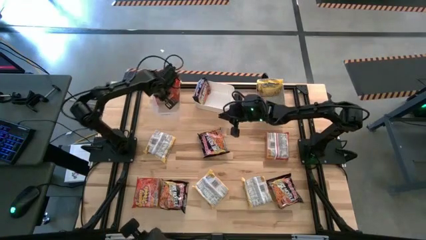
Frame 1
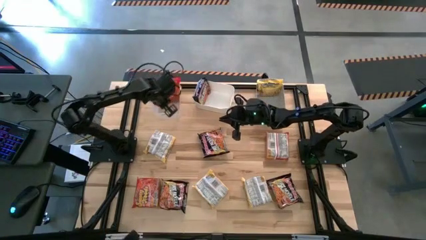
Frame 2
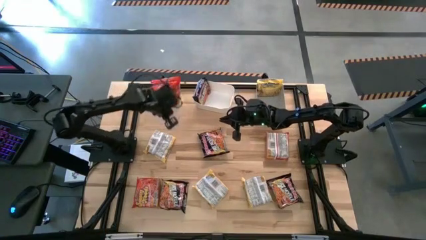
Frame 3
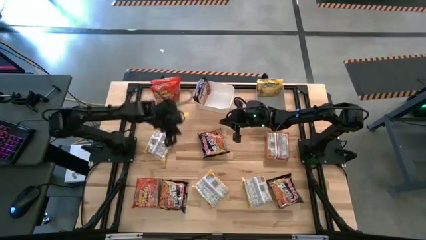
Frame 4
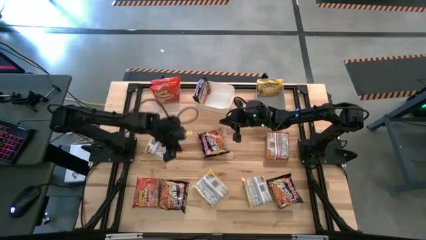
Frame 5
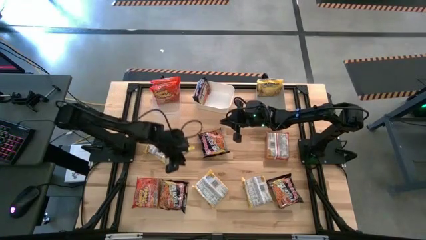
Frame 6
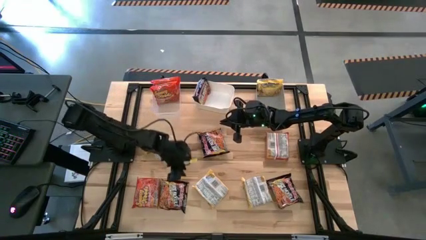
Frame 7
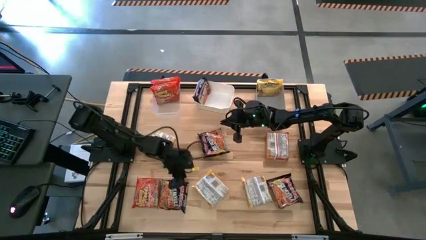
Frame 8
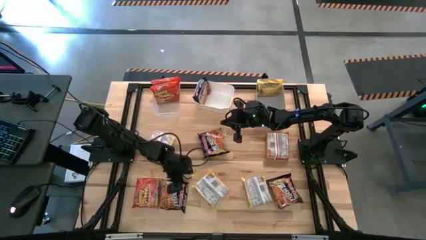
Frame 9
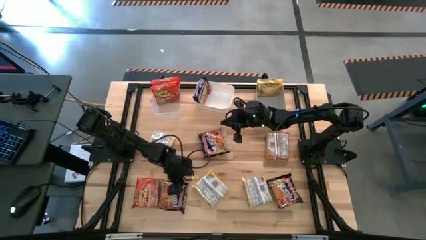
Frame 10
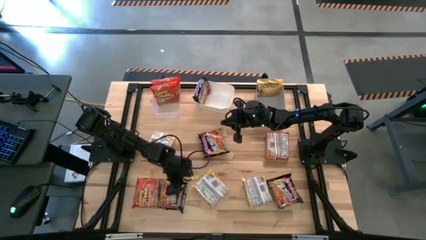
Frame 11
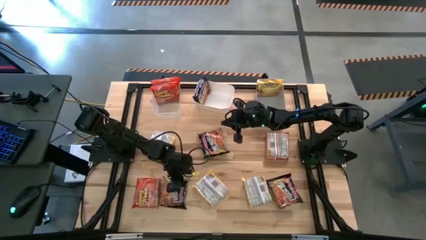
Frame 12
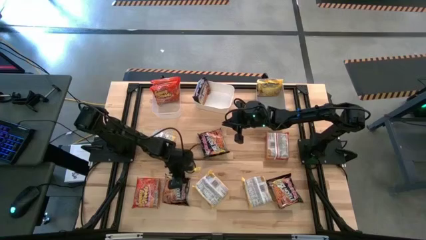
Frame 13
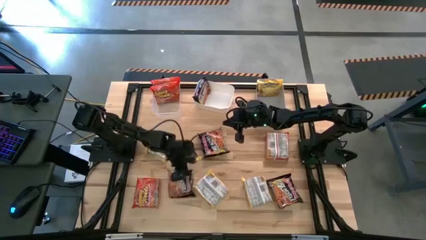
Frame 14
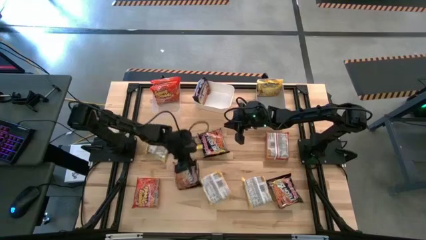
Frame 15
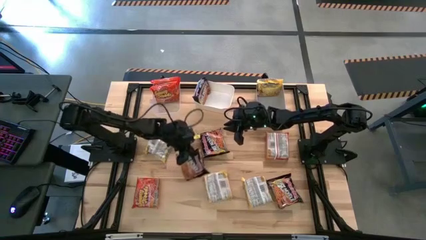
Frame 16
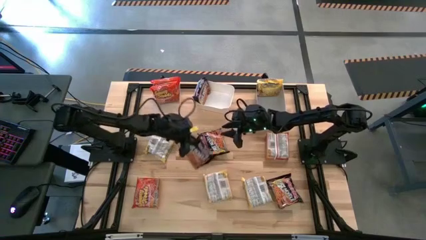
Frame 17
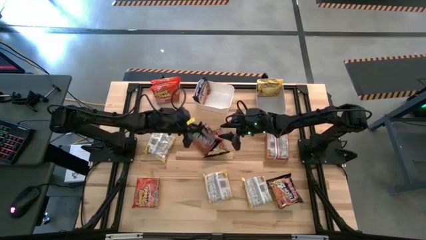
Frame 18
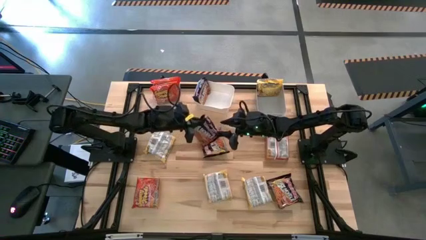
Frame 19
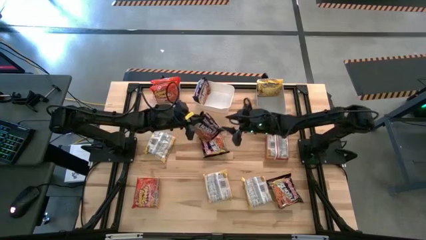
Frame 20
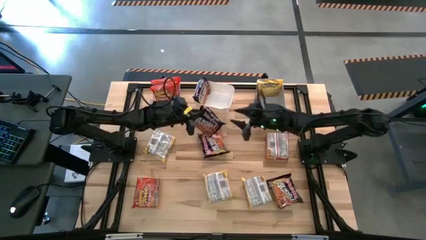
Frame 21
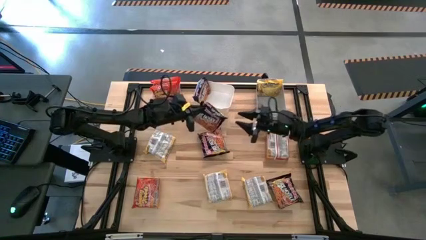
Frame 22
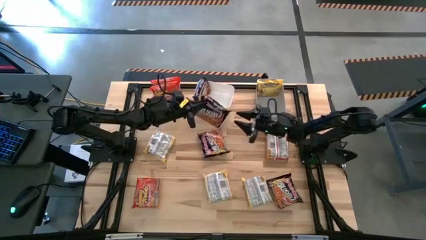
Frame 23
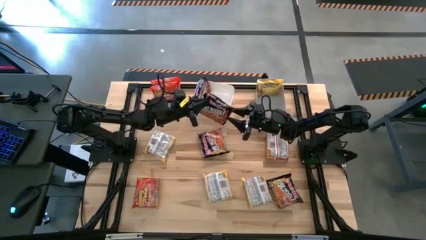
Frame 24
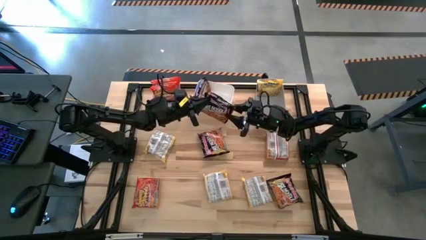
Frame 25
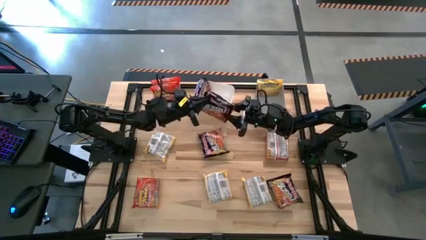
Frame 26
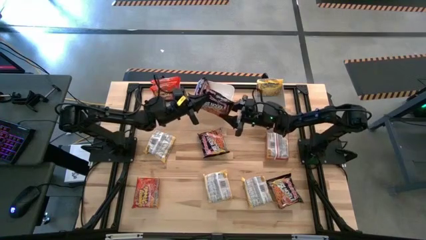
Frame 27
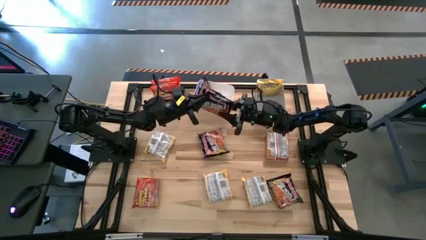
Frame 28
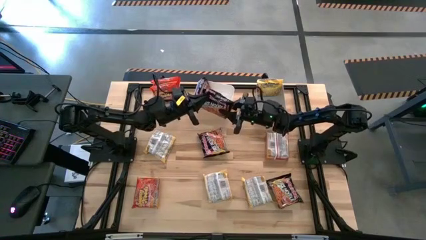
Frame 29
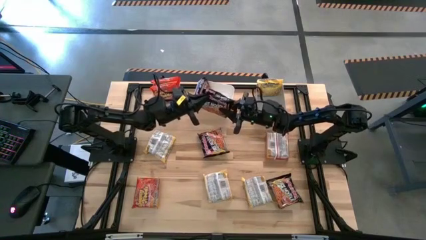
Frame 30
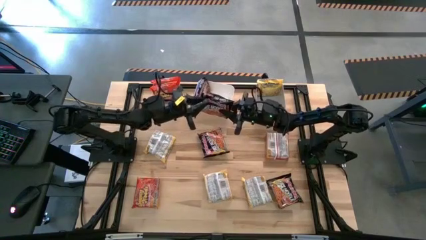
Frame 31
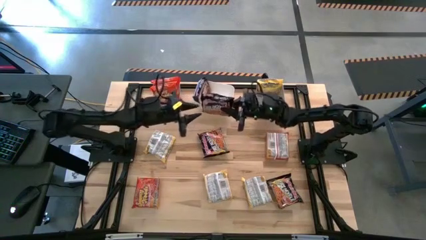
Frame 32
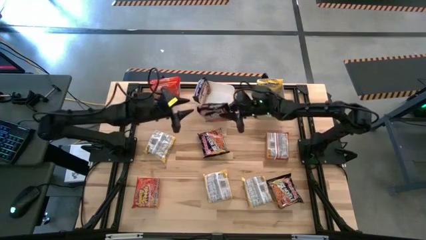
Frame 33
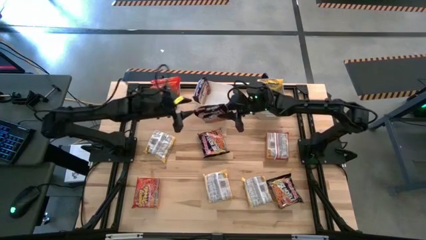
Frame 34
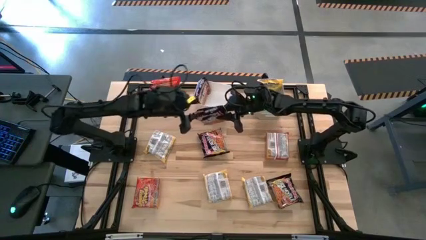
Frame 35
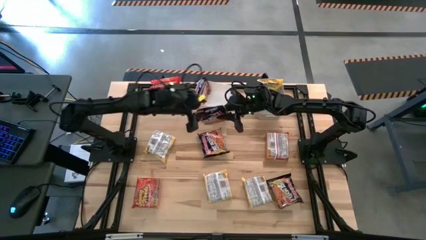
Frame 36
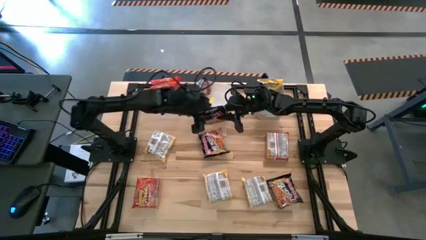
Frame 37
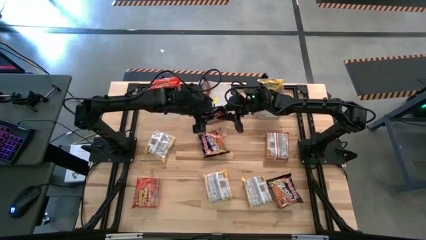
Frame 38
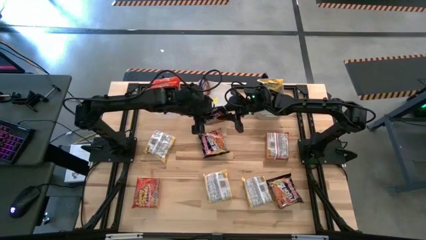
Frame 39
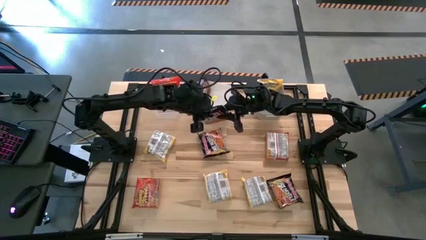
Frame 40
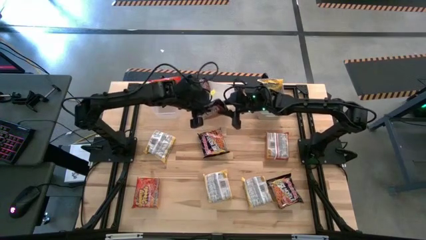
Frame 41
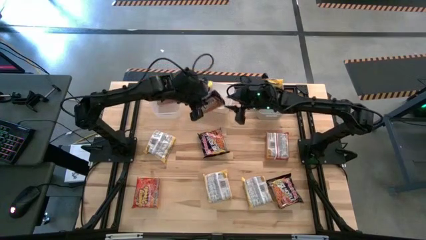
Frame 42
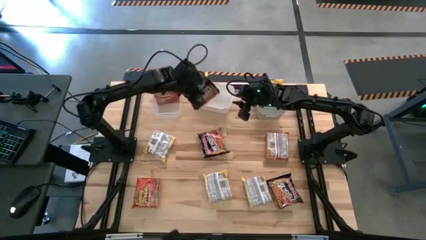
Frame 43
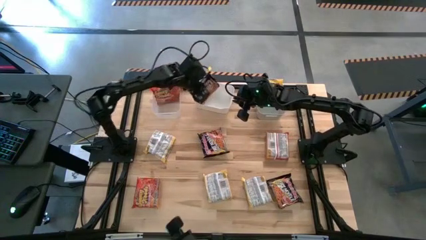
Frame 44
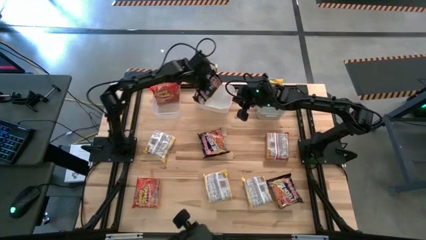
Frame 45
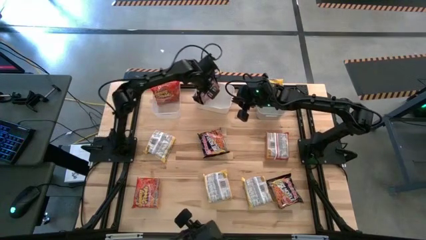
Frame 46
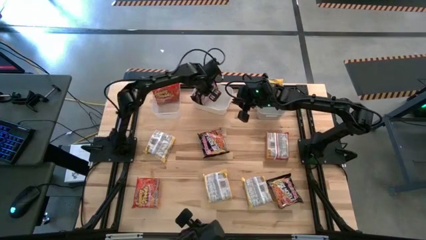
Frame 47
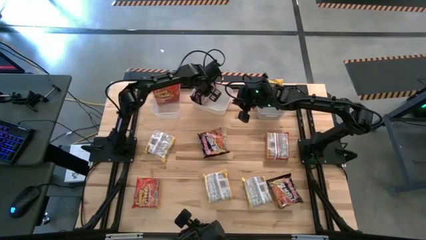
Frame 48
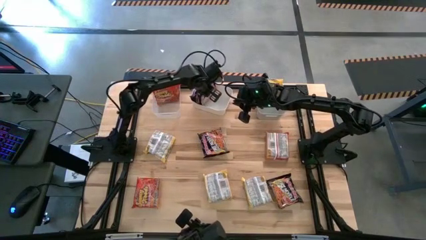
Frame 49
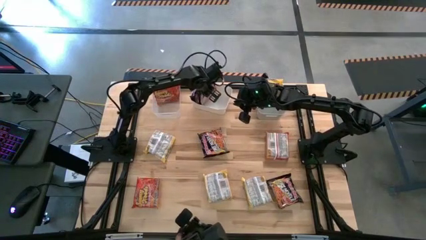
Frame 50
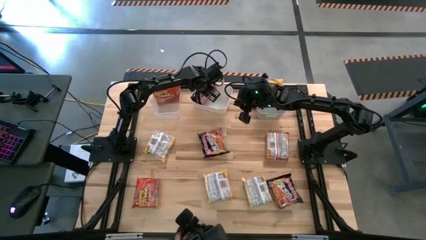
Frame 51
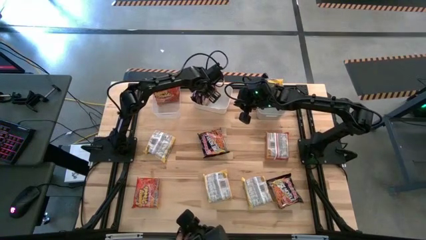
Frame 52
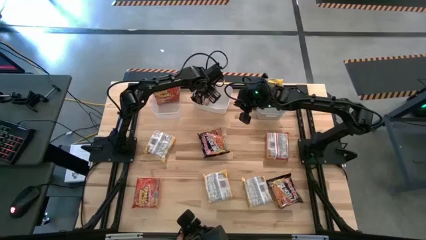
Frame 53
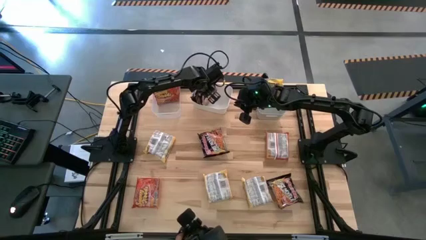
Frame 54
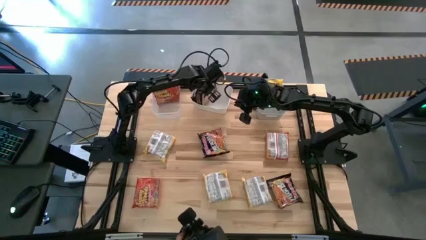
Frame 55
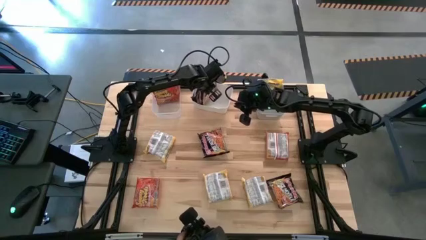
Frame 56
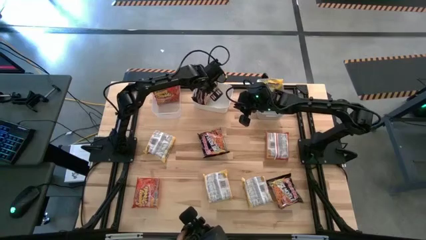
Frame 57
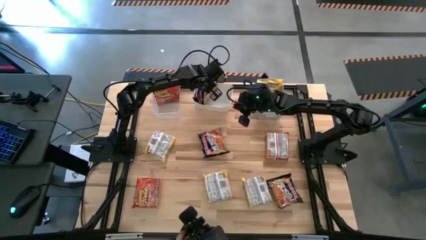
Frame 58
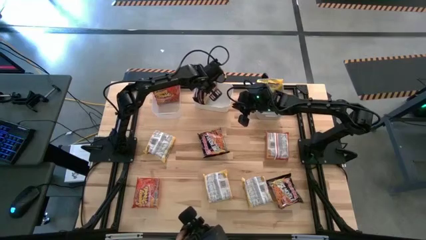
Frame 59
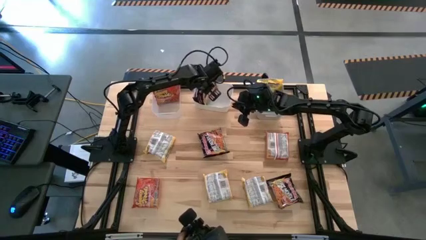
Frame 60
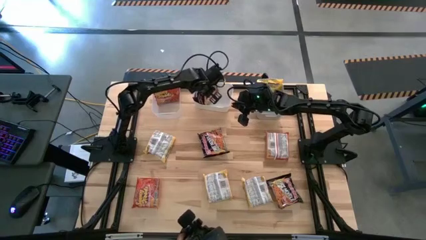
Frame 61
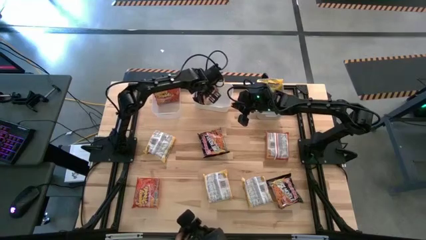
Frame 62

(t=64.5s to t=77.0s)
Task: Sort Maruchan noodles
Put the black noodle pack into the white bin

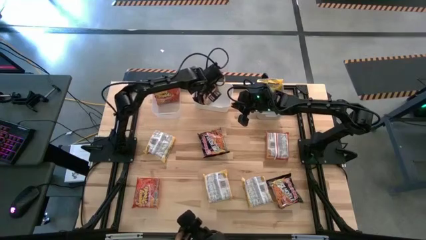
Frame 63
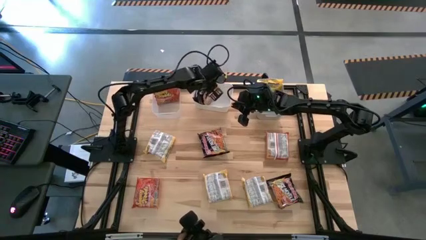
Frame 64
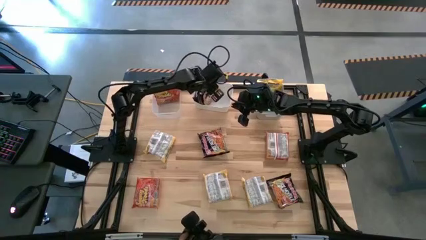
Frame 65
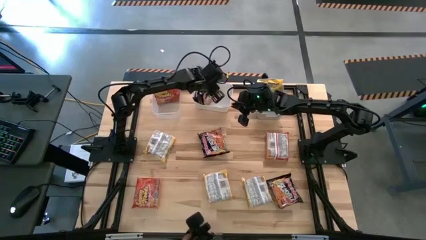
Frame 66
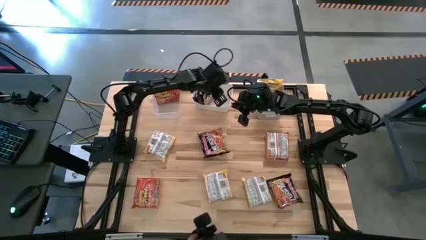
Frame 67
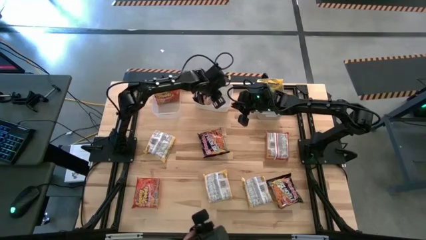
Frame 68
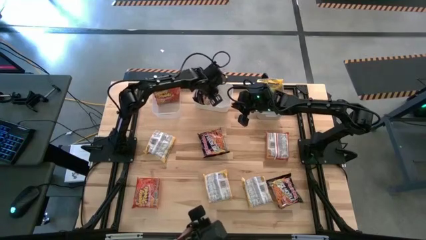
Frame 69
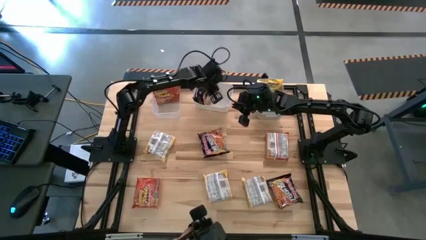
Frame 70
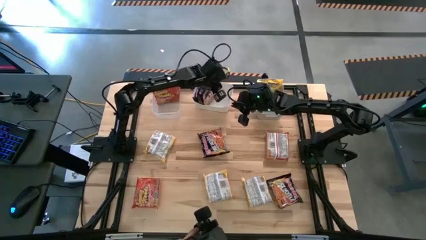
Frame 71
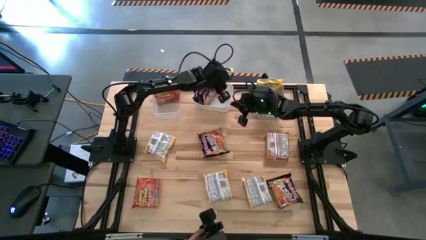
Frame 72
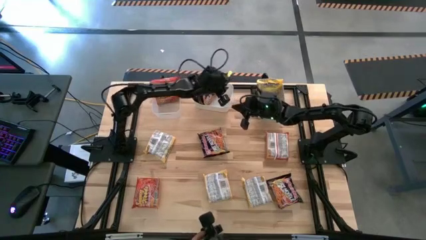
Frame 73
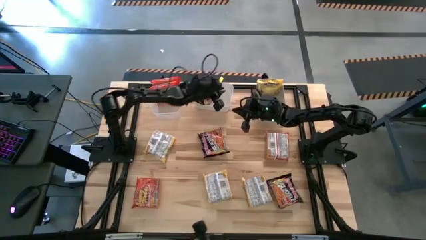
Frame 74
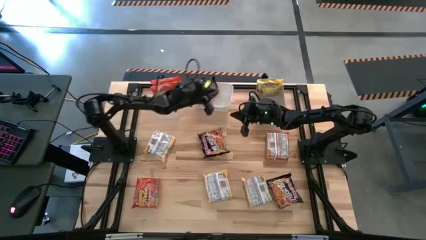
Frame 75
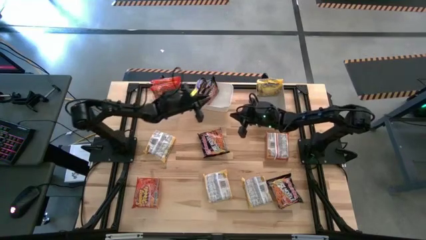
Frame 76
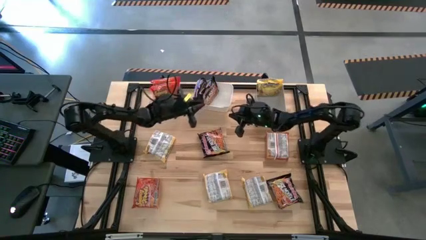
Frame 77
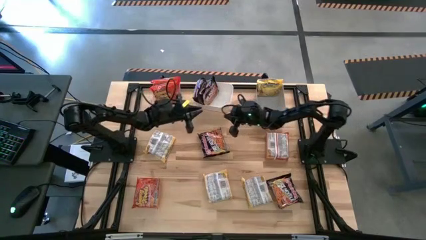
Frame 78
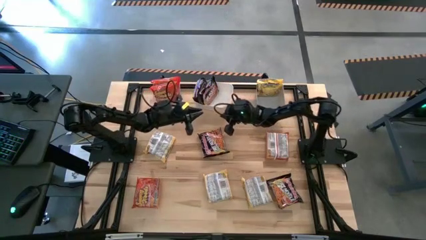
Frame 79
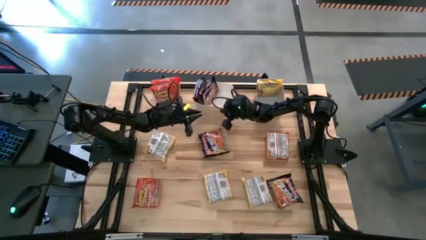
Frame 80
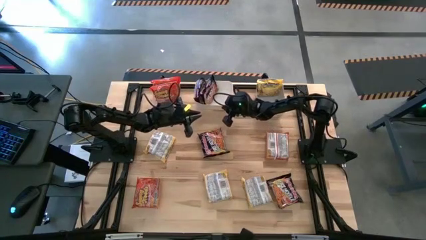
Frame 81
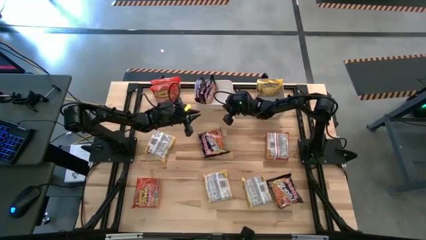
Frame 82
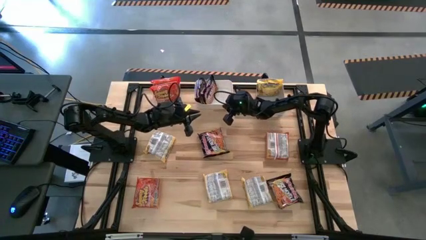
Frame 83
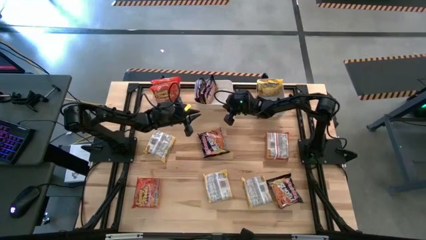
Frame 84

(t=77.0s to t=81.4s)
Adjust the white bin
